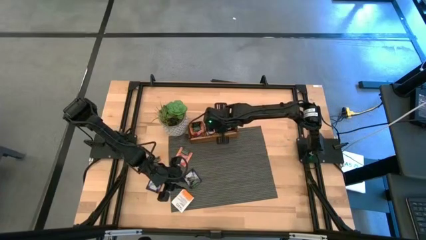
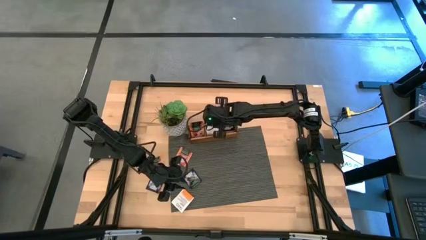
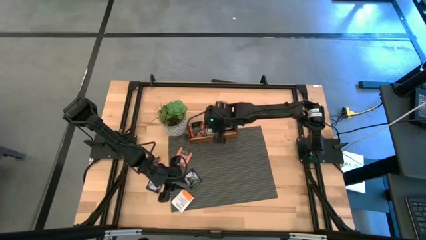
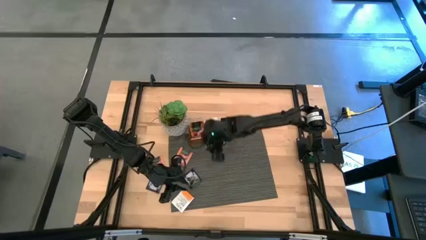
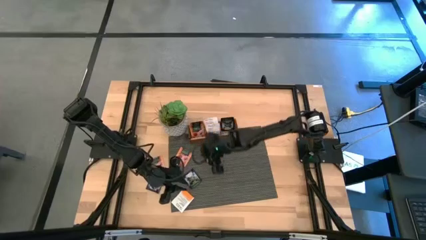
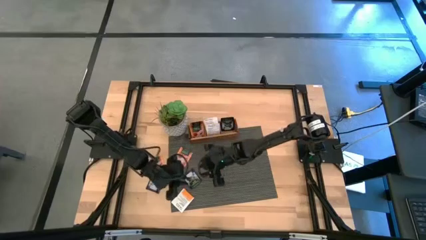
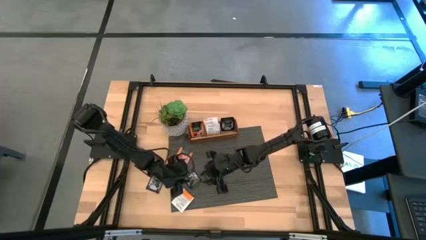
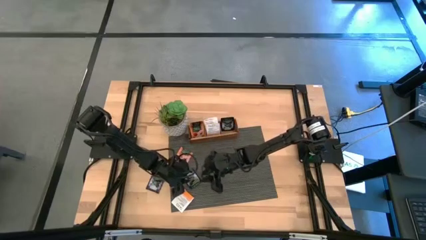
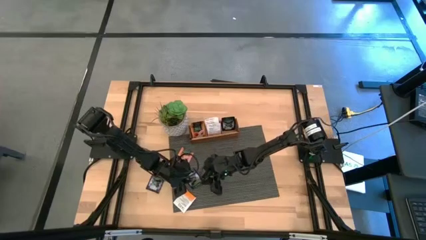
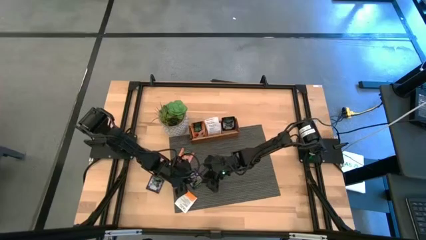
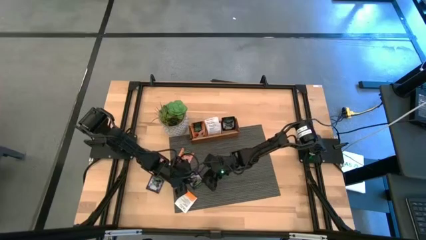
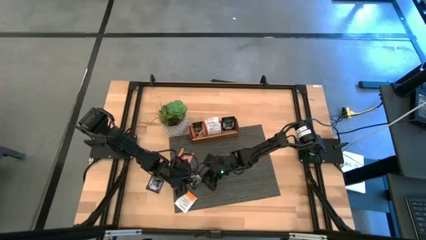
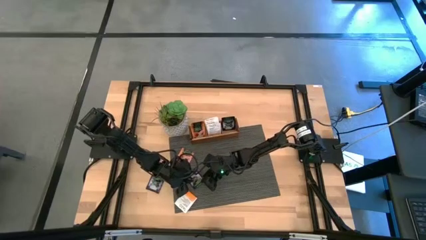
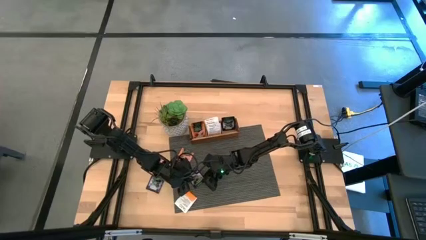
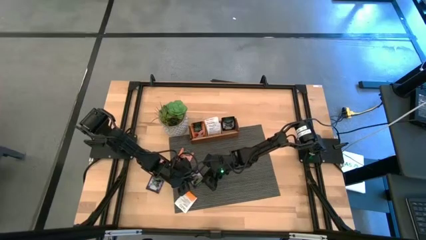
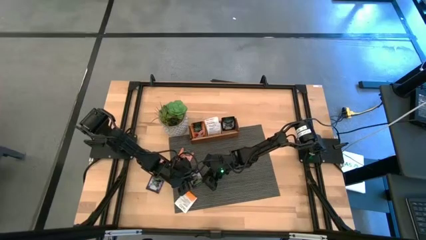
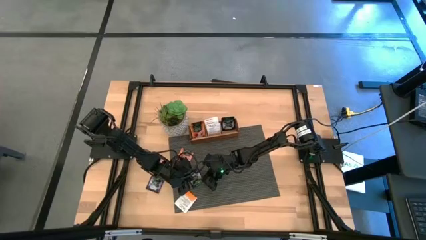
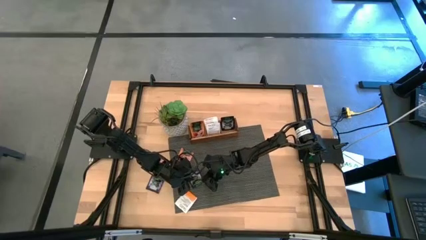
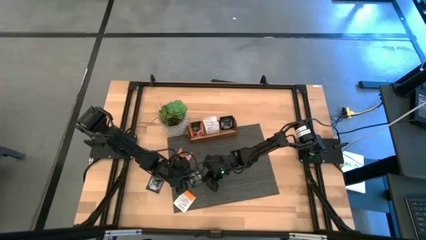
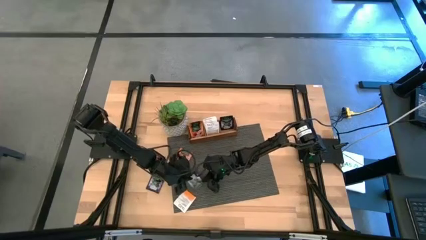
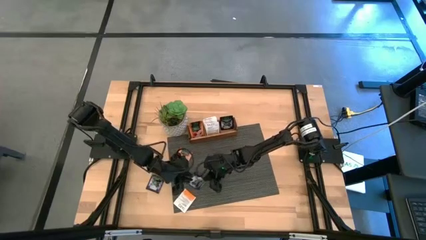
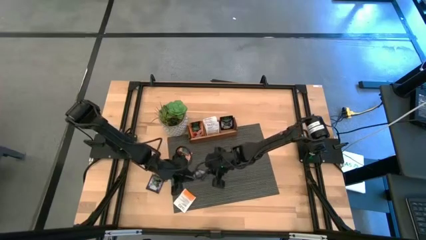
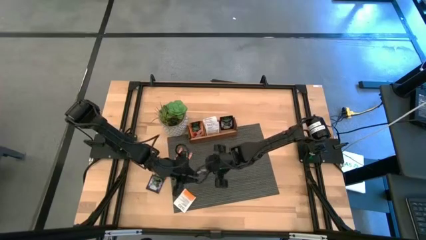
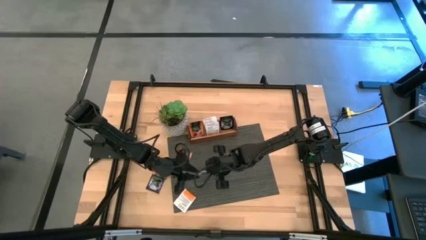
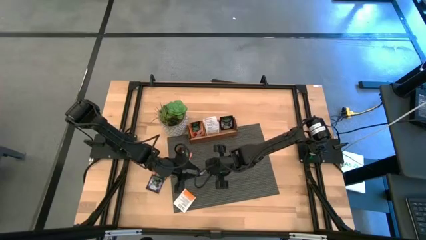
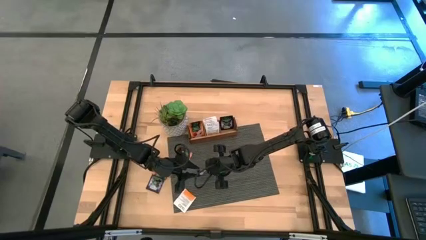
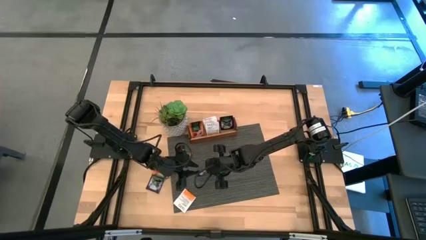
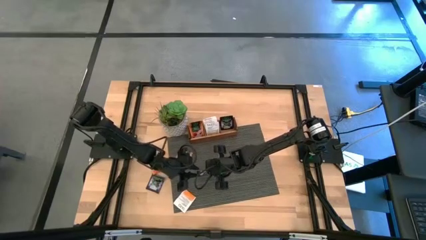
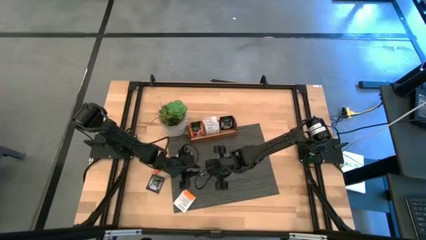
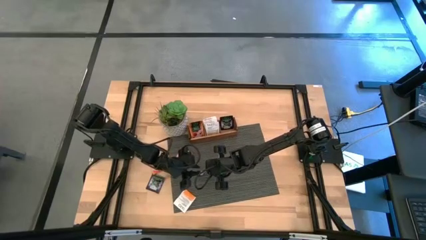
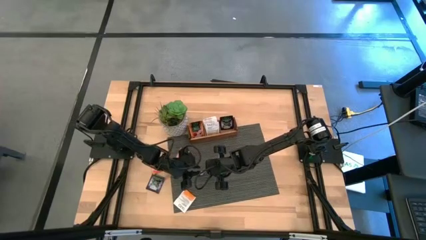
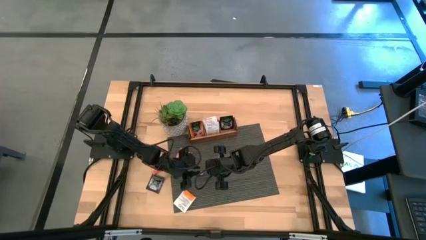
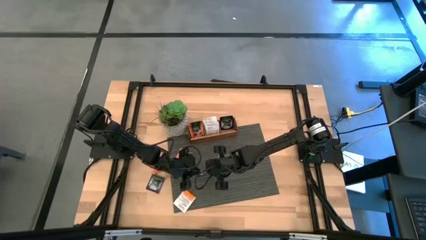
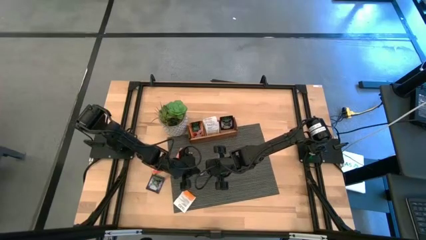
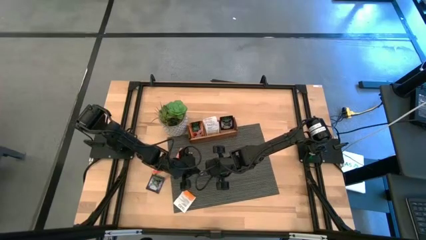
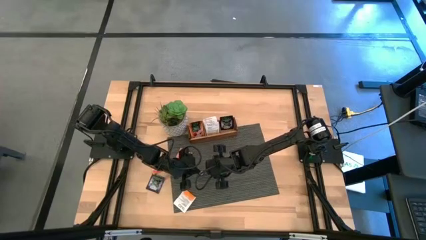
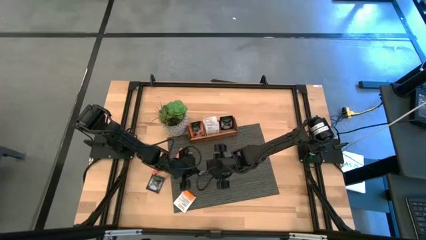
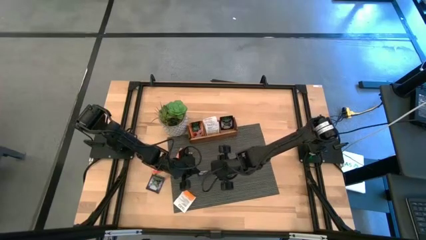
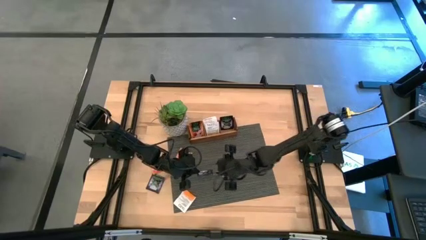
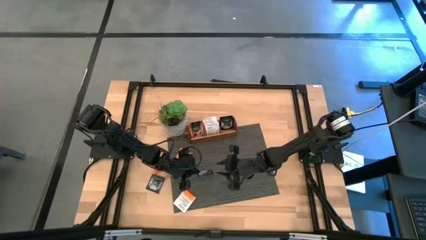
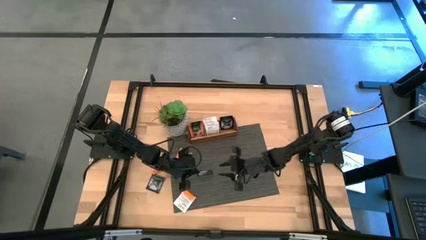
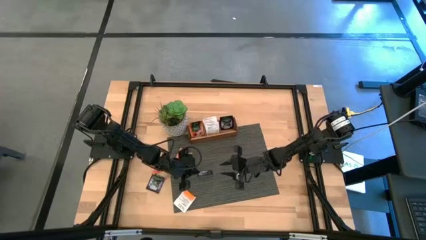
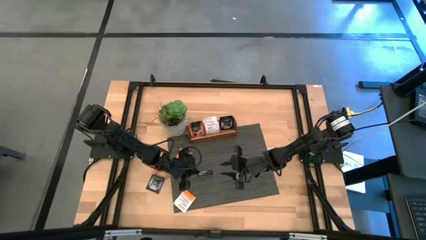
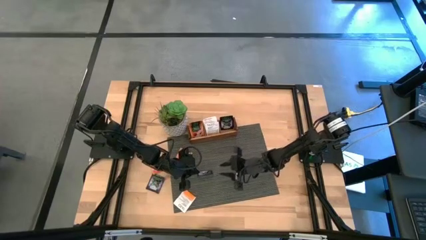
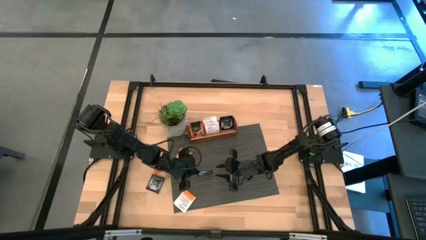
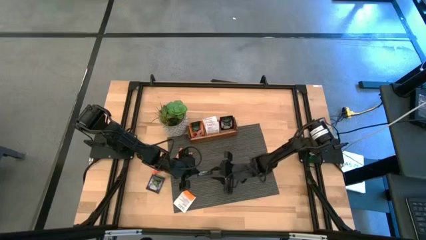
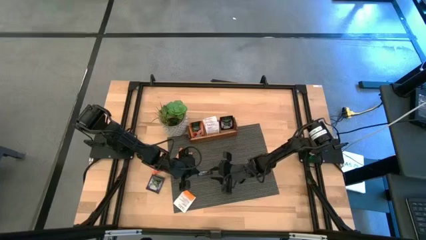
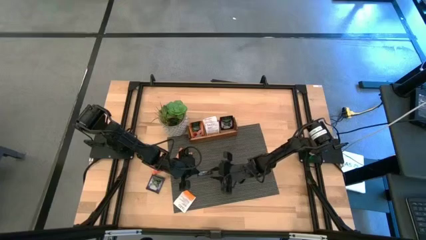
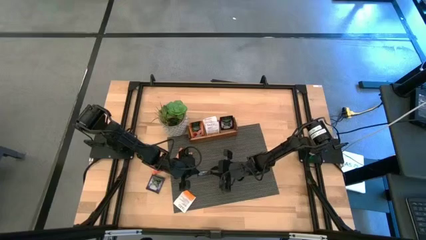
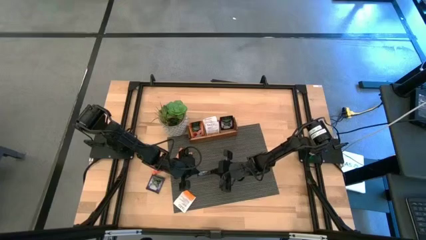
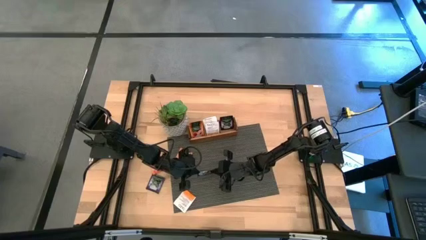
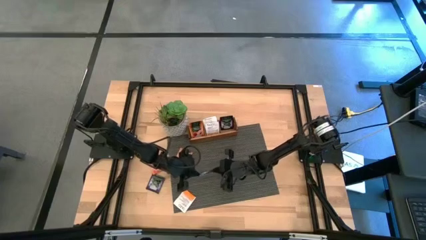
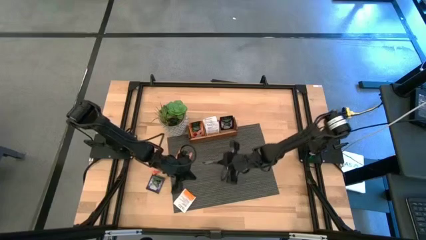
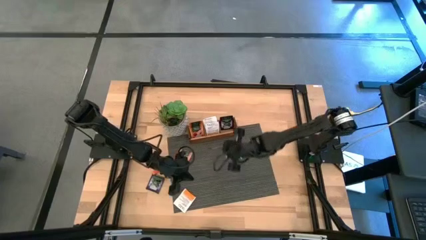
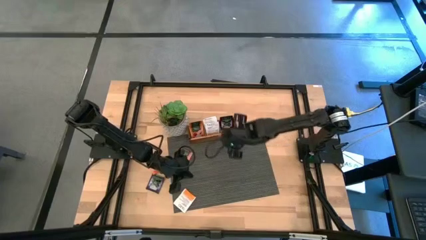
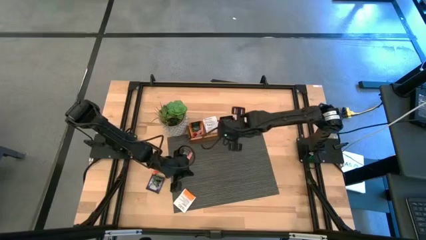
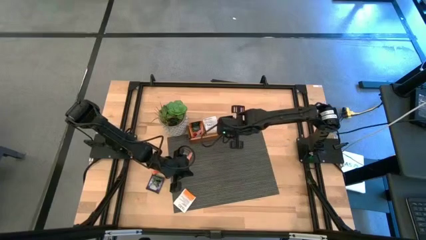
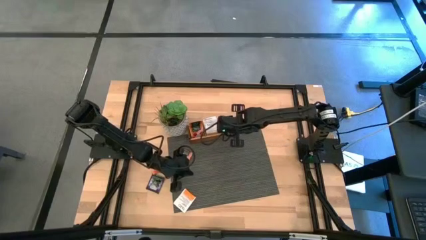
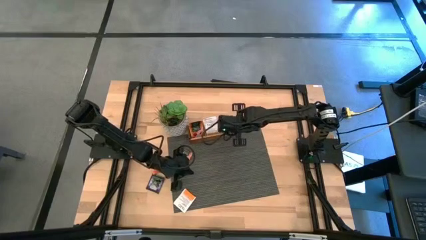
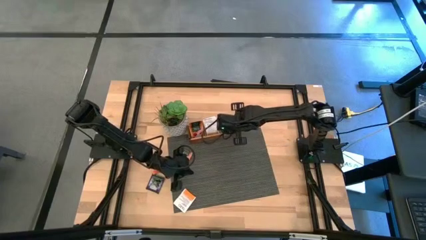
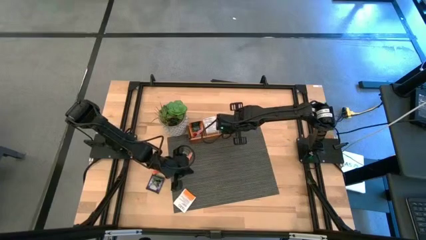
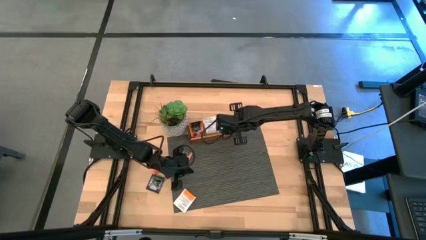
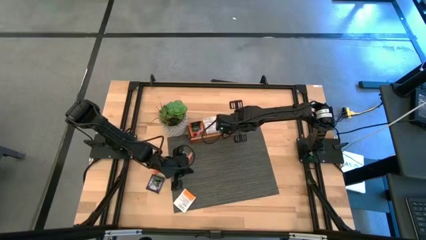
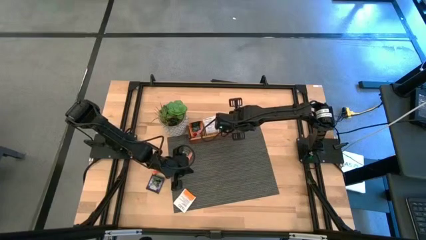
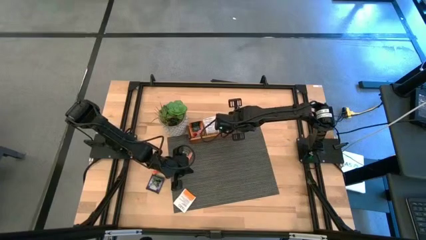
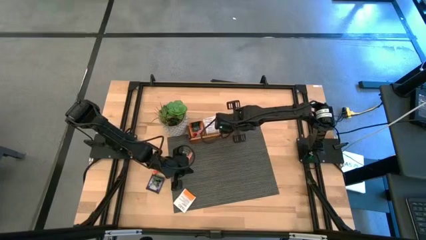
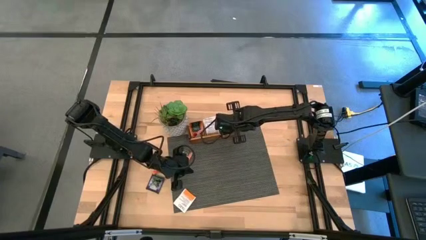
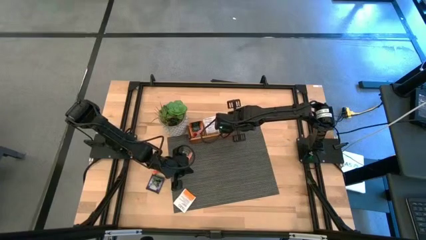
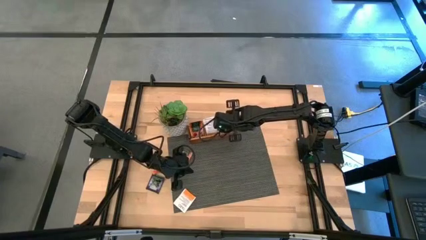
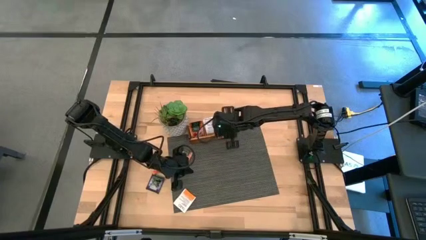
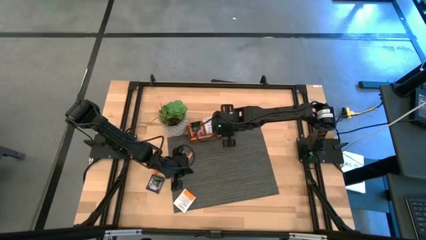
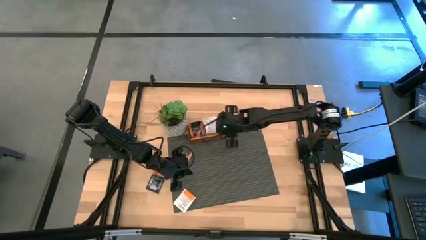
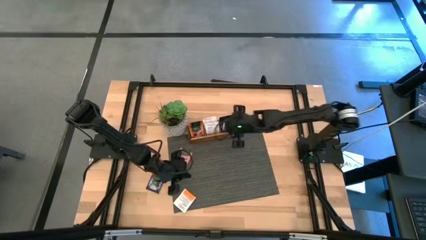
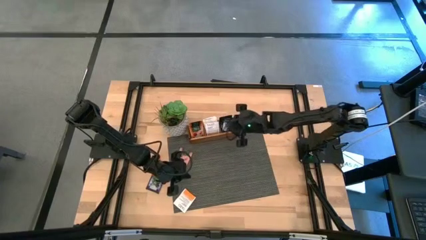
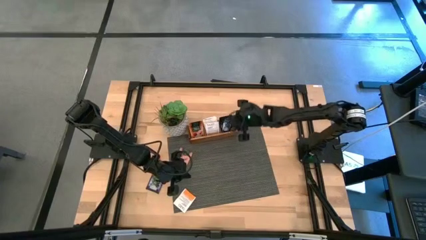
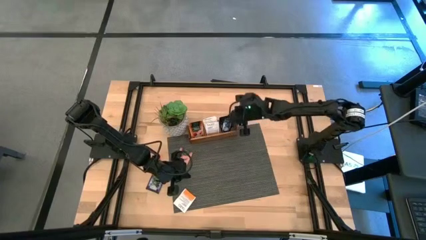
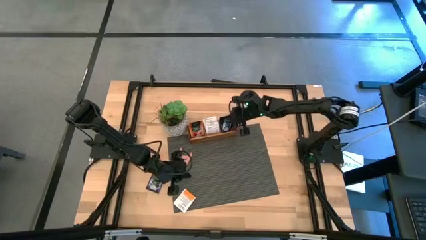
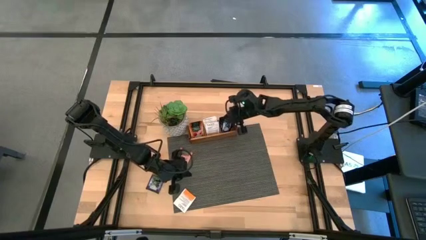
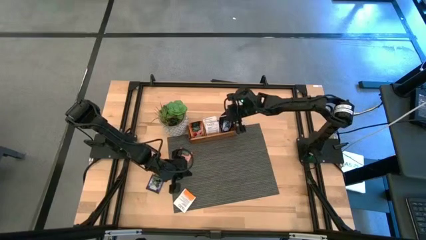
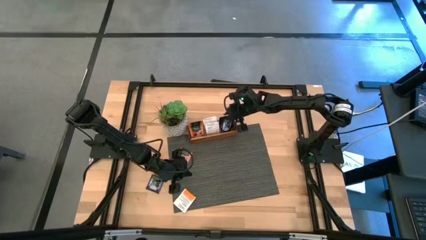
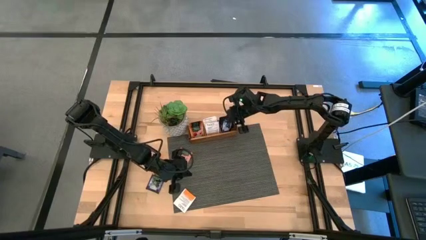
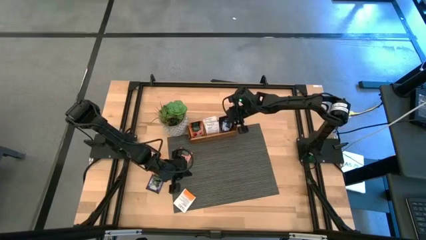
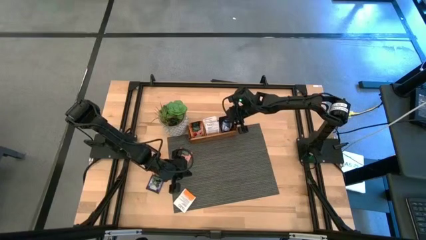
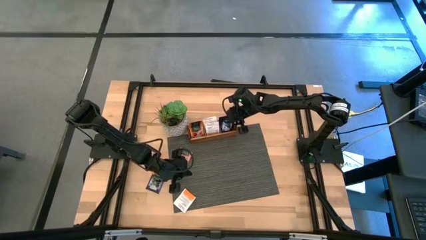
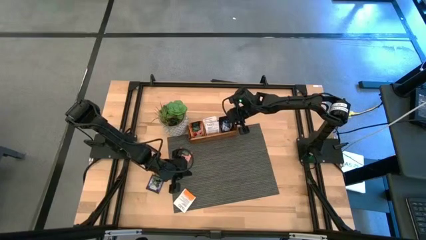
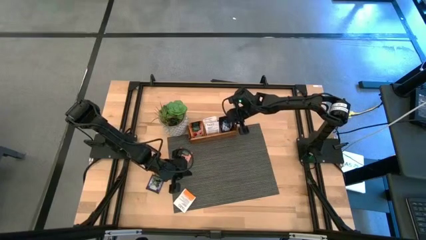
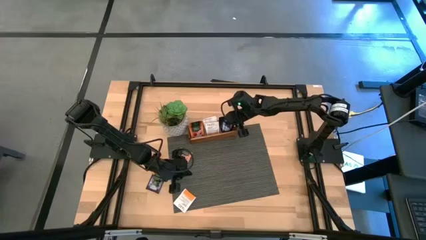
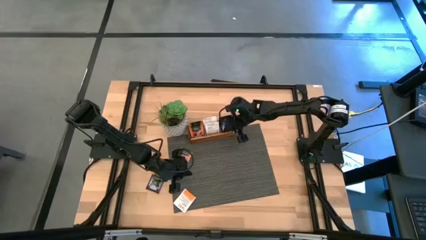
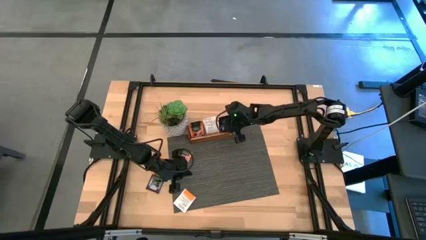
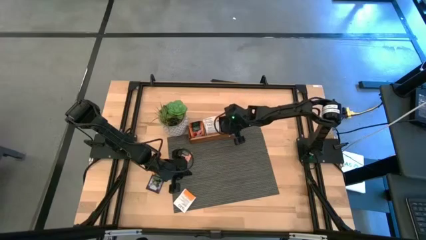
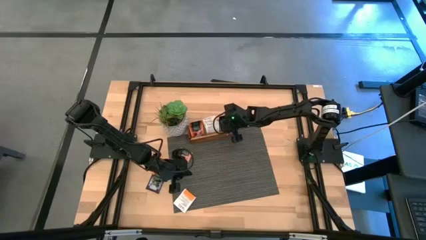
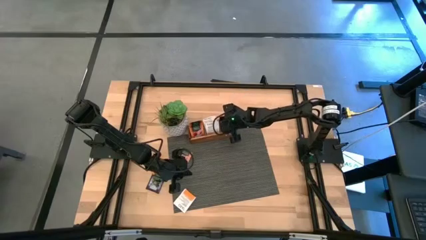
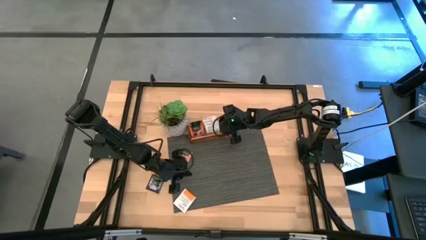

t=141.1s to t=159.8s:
Task: Pick & Place Tea
Put the black tea bag into the right slot of the wooden organizer
